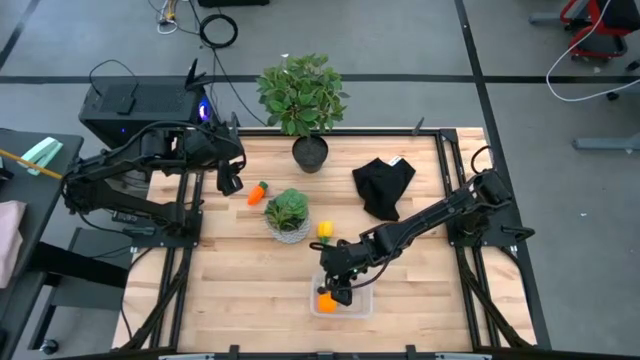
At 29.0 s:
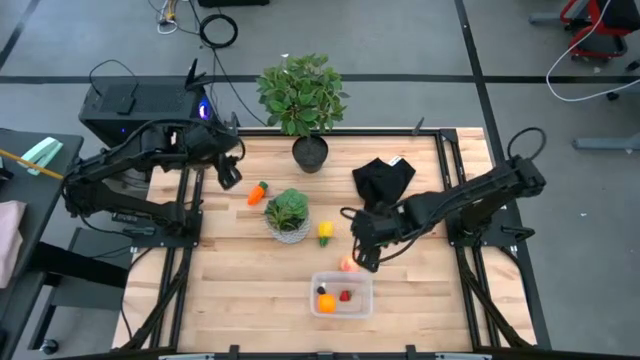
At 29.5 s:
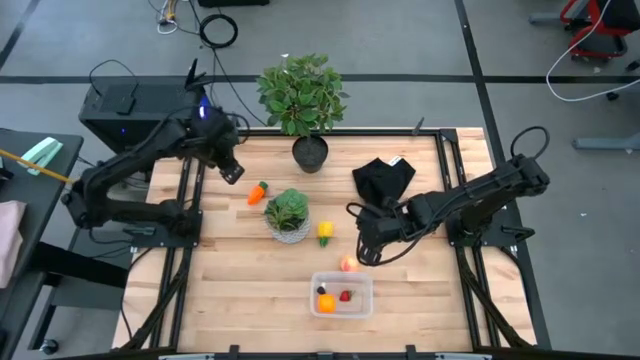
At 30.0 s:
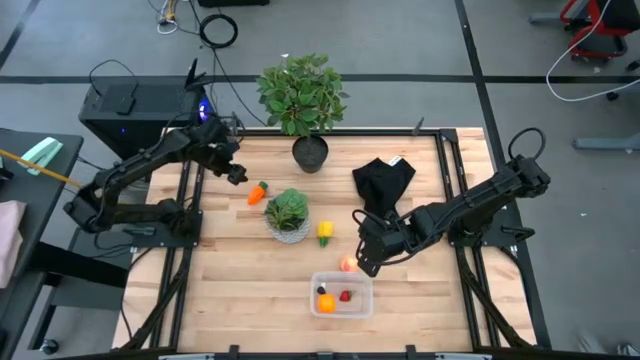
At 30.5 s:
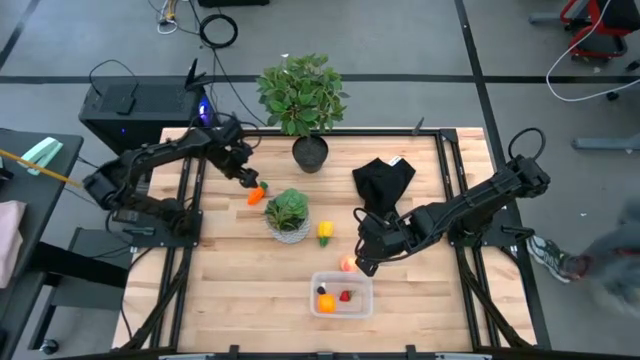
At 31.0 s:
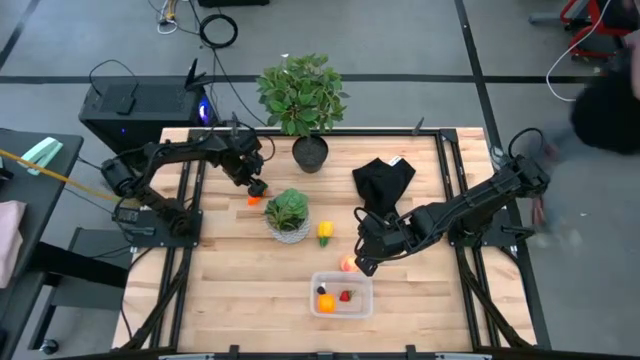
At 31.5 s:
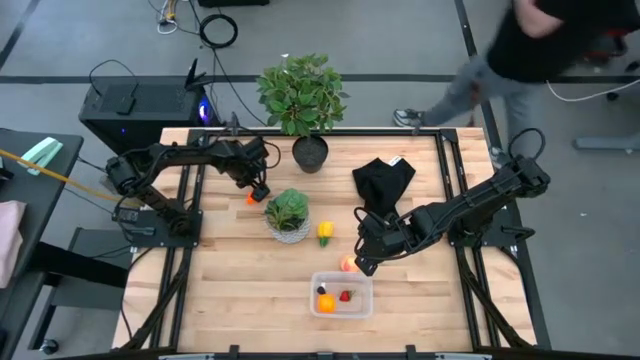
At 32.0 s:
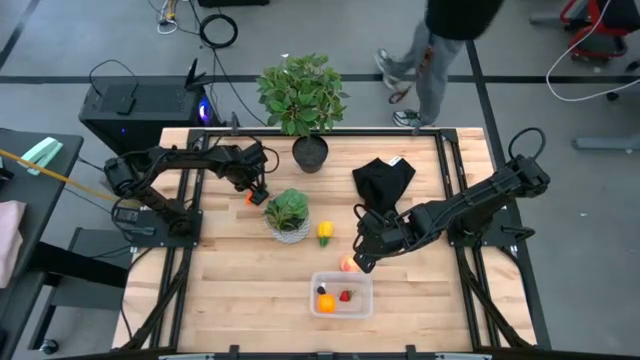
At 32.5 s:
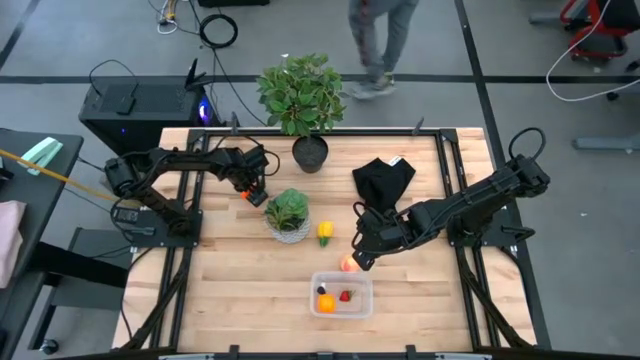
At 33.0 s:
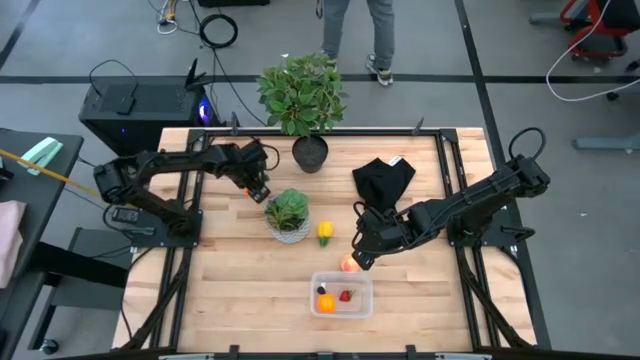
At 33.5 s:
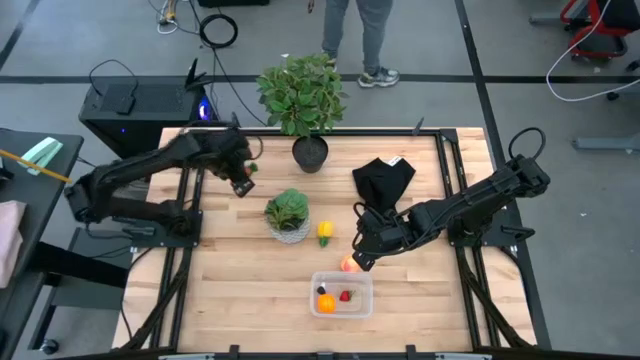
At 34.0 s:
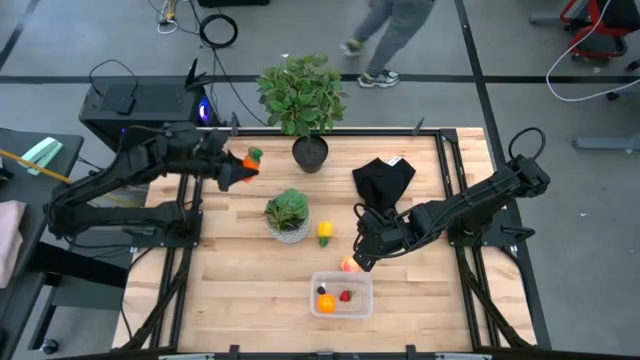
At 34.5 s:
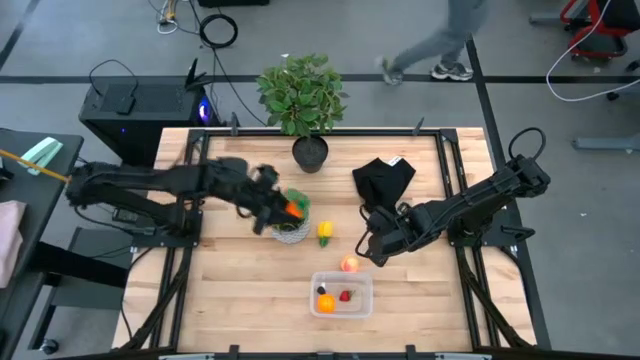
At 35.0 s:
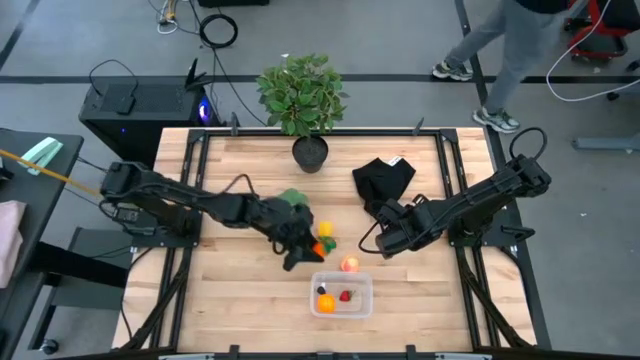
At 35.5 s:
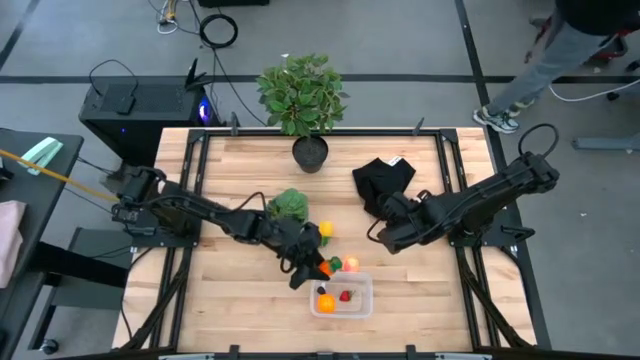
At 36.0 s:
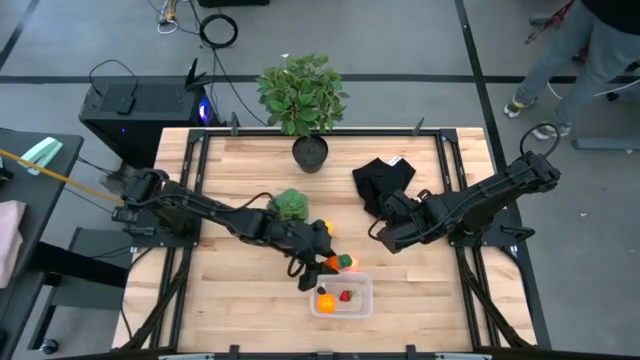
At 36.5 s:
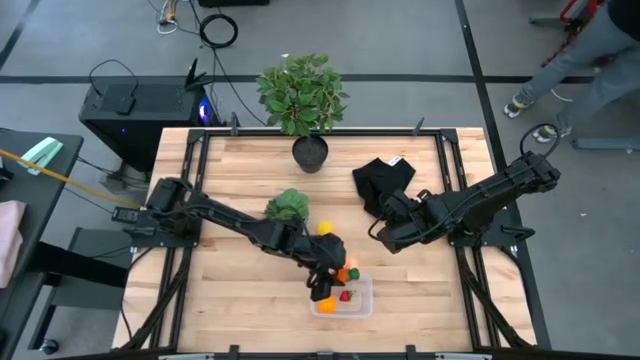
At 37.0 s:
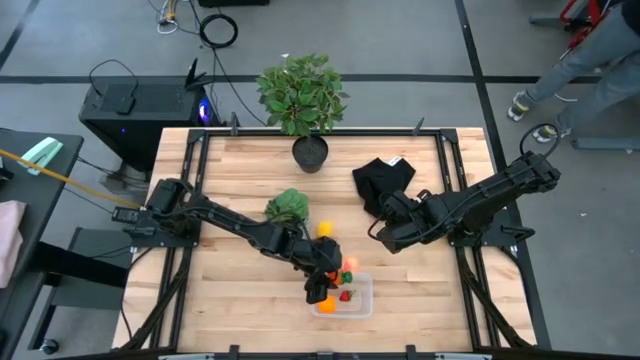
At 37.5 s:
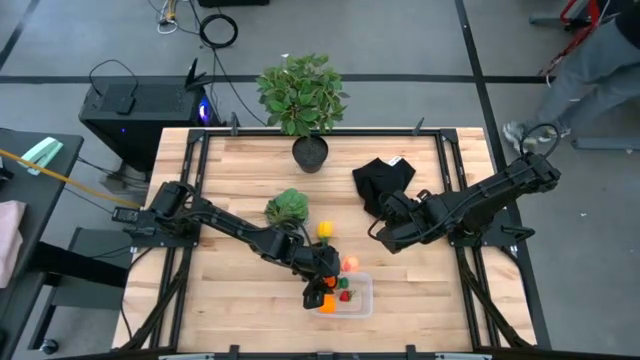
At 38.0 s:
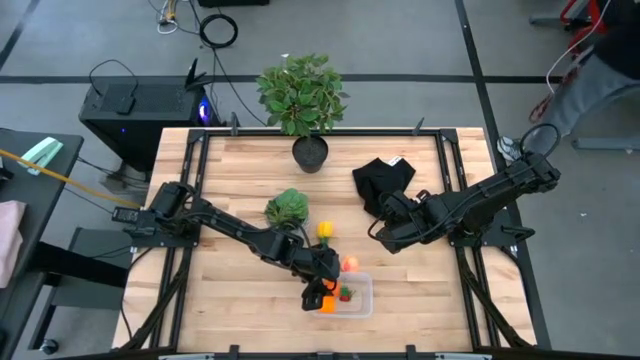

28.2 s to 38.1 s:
Task: Pick and placing Produce into tupperware
Put the carrot in the transparent bin

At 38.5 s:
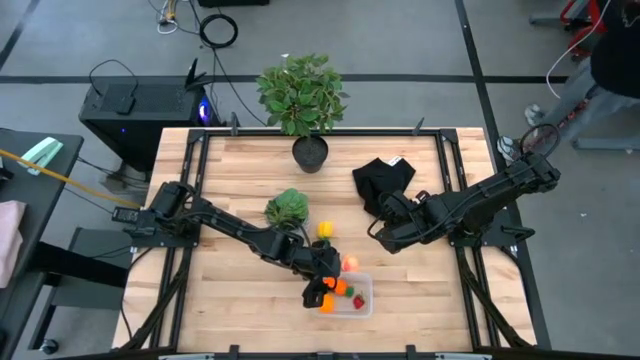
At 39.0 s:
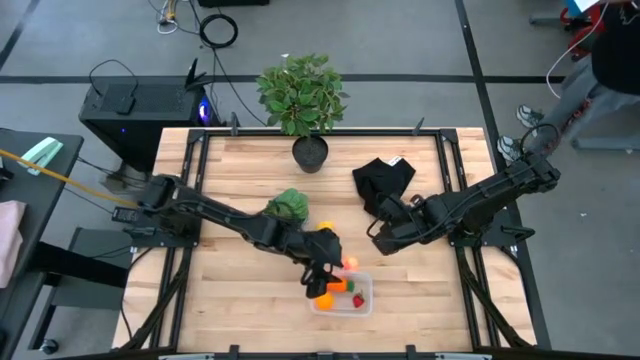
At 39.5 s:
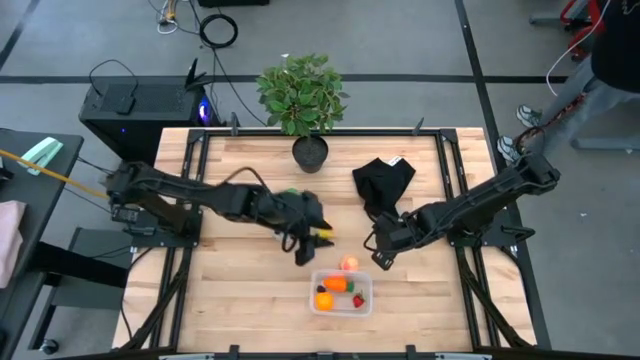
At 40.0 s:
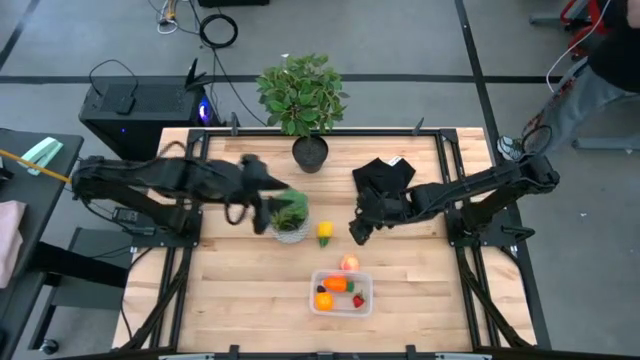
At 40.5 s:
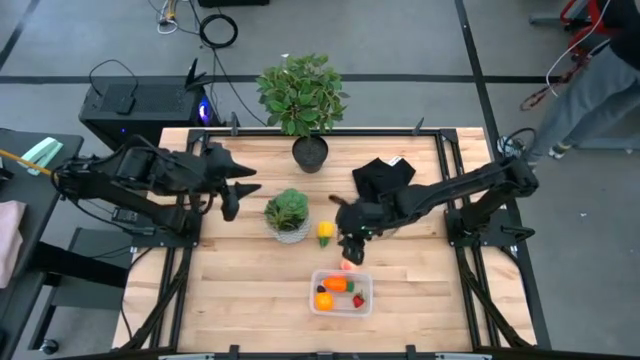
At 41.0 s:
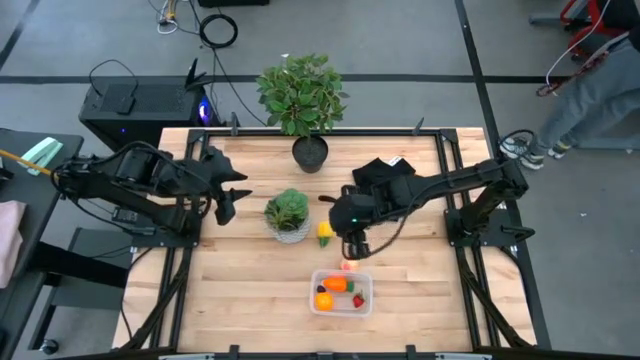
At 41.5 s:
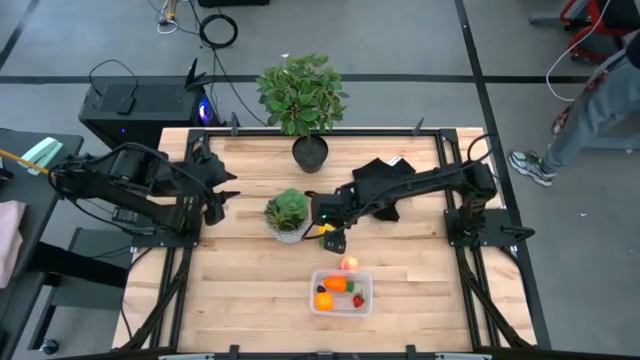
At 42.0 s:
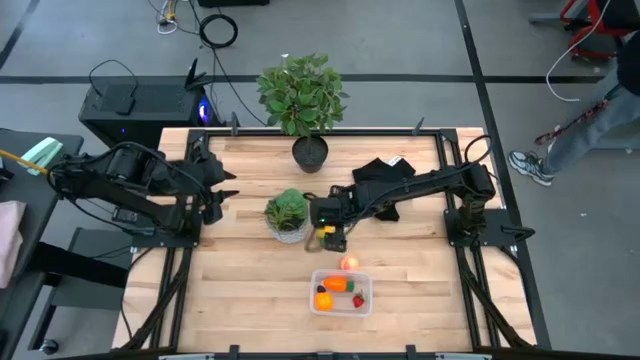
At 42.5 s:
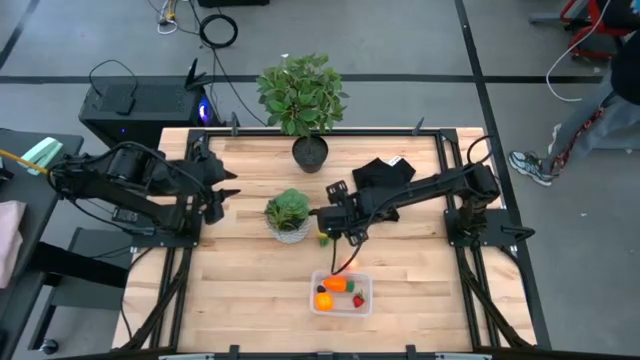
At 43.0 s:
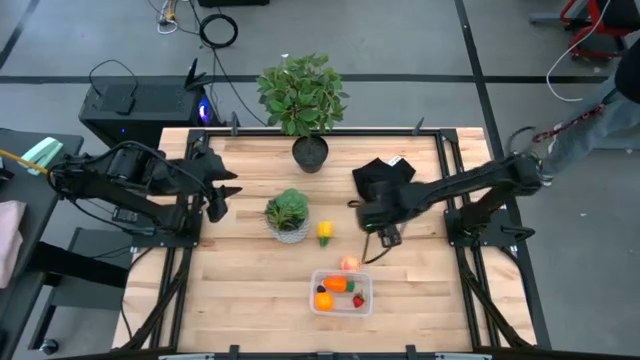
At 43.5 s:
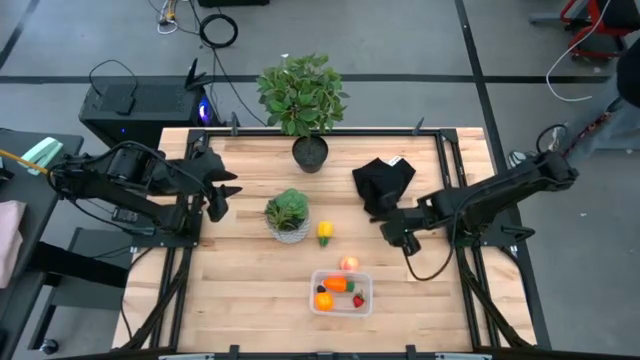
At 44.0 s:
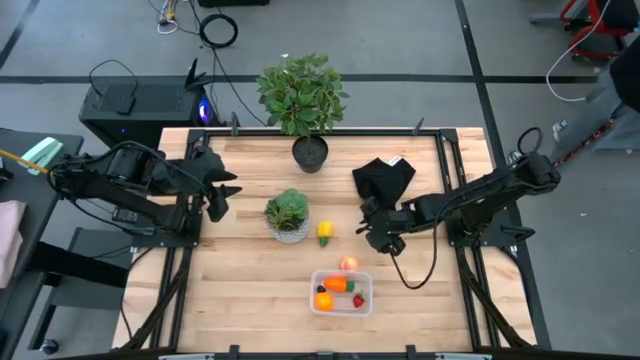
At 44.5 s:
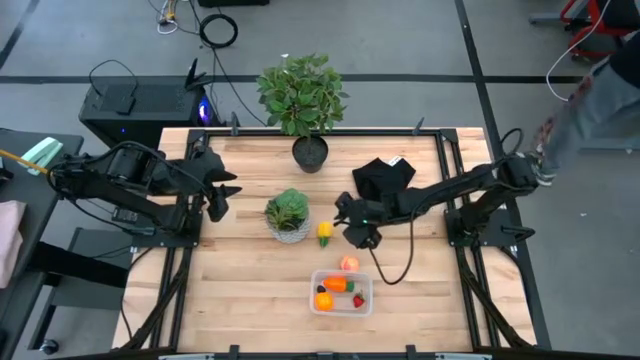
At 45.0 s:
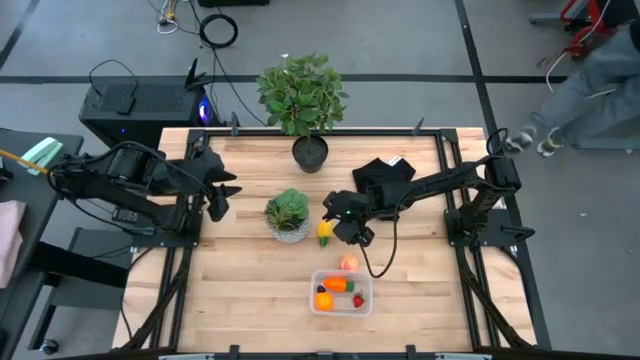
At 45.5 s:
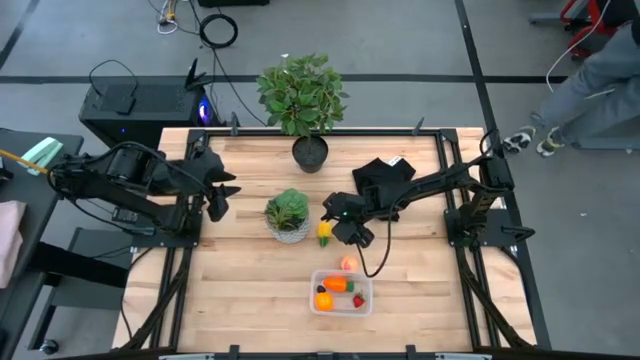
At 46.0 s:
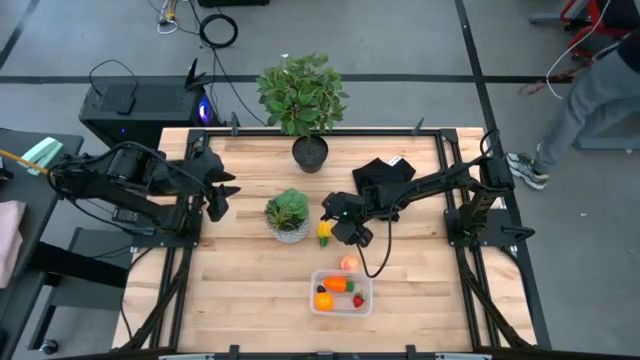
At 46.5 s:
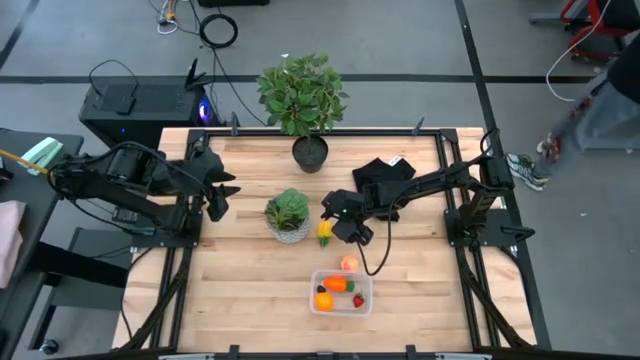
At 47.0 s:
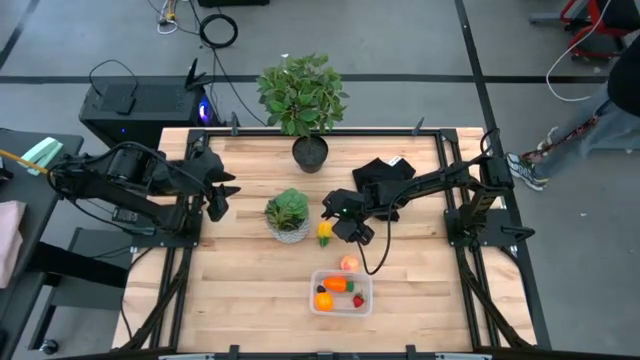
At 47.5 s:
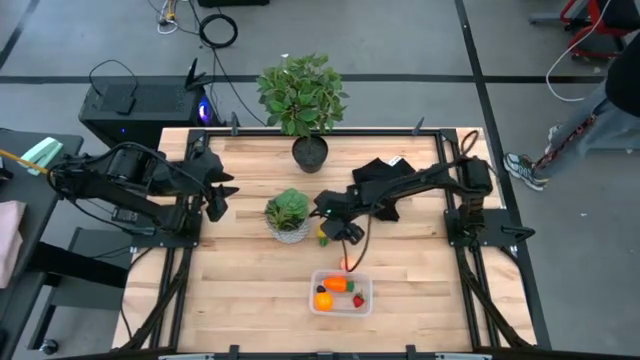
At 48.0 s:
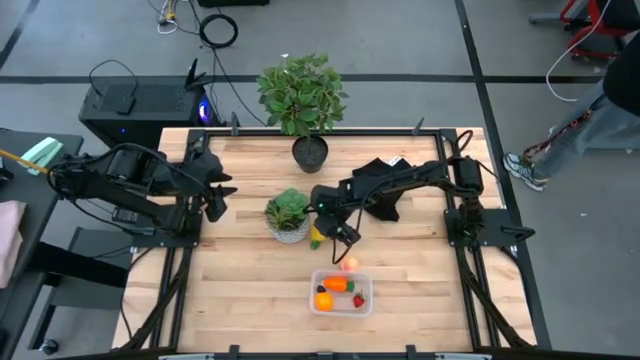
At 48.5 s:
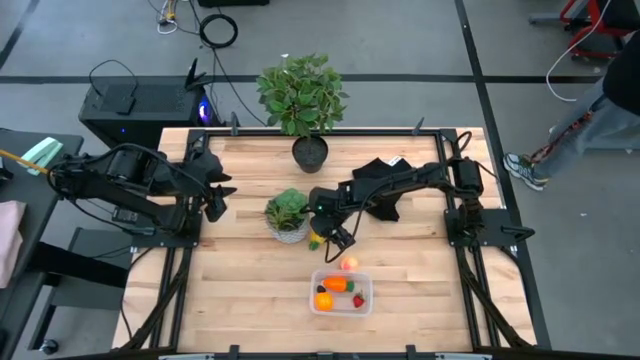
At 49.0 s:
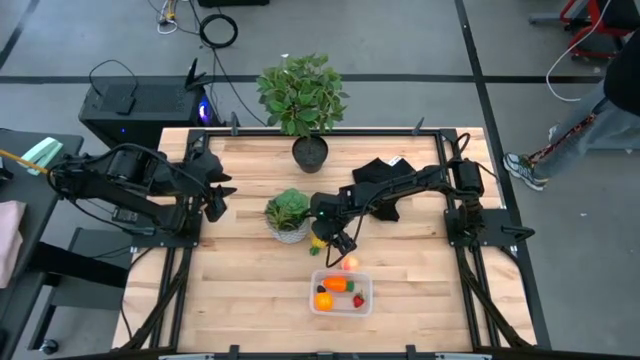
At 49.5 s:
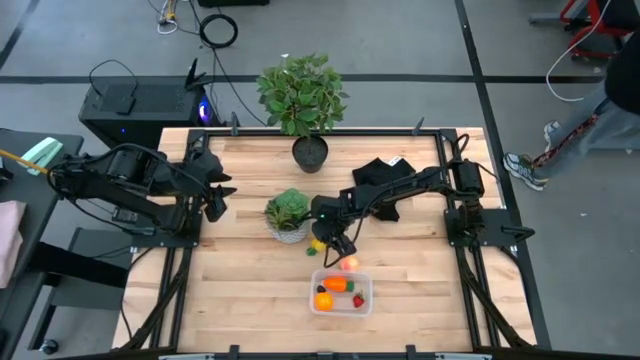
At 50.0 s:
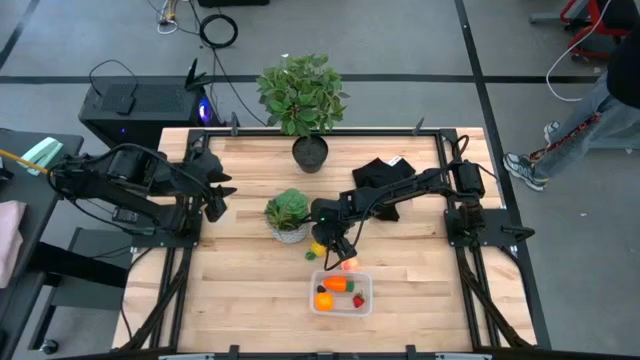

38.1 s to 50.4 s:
Put the pineapple in the transparent bin
